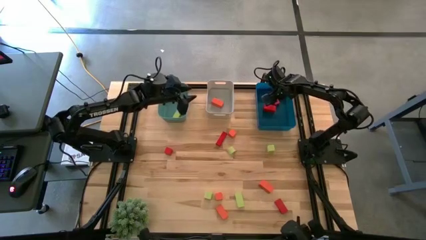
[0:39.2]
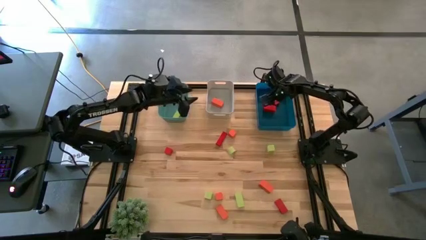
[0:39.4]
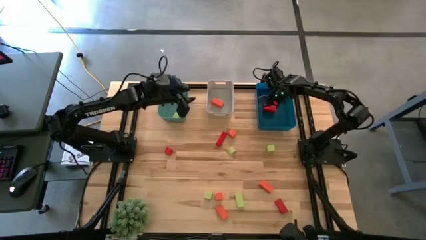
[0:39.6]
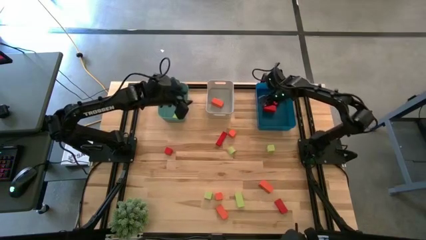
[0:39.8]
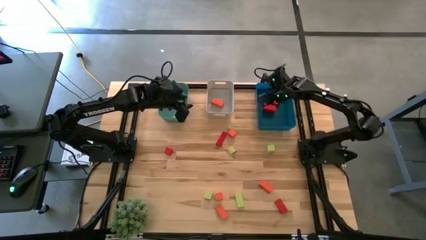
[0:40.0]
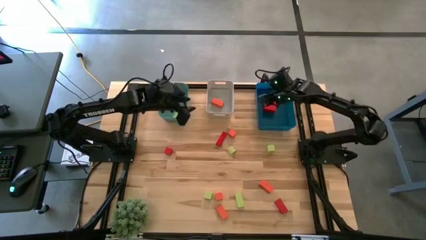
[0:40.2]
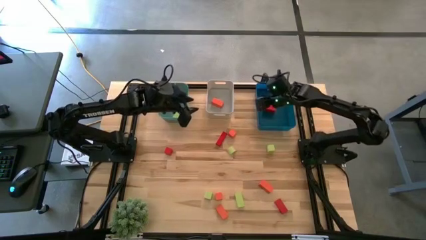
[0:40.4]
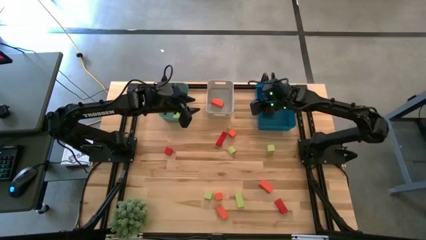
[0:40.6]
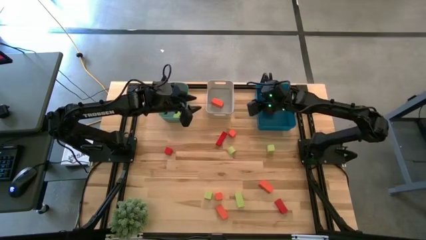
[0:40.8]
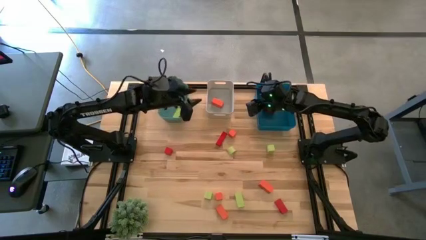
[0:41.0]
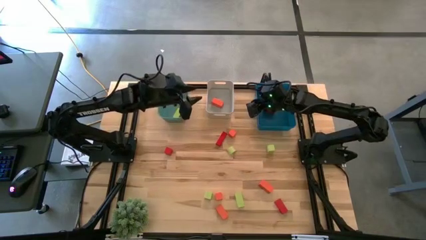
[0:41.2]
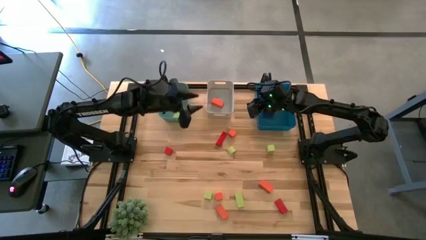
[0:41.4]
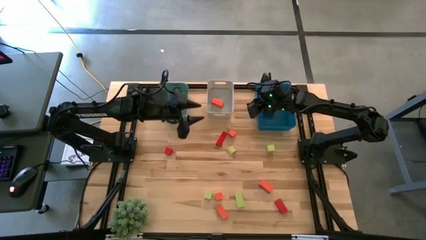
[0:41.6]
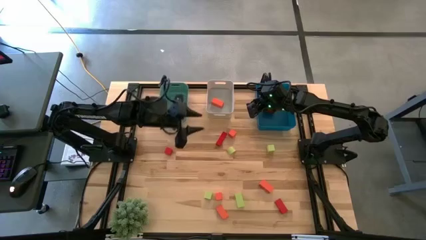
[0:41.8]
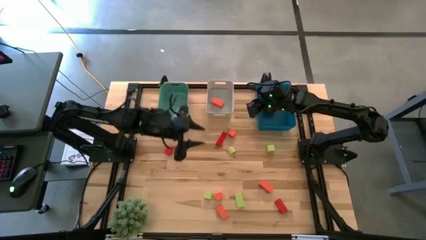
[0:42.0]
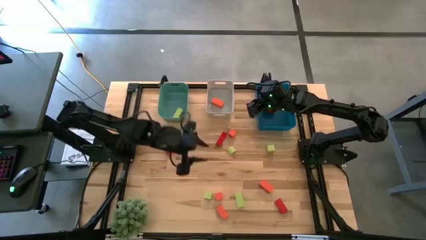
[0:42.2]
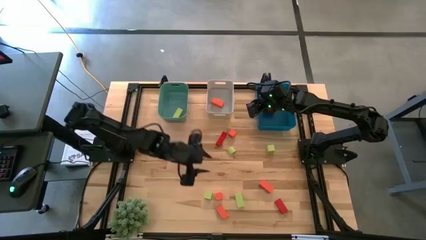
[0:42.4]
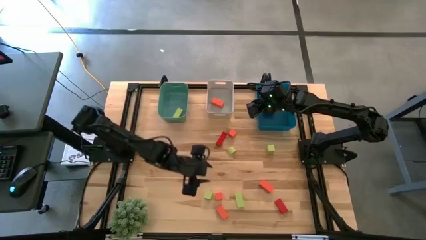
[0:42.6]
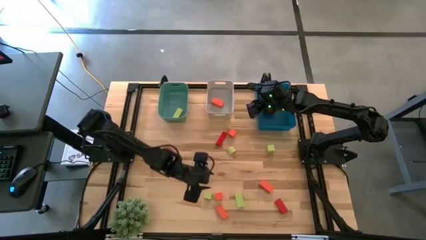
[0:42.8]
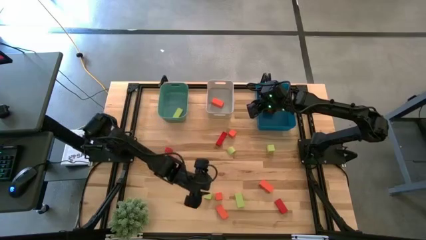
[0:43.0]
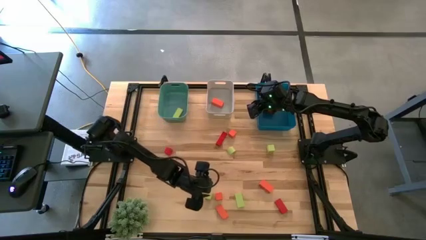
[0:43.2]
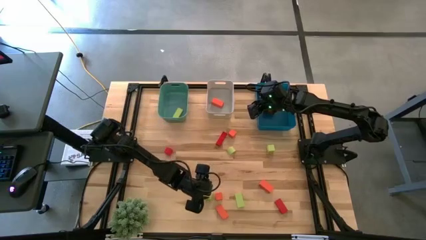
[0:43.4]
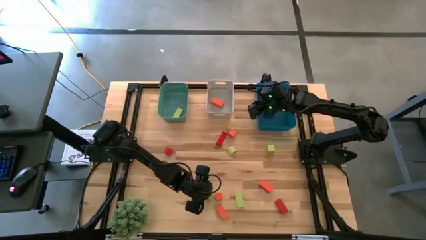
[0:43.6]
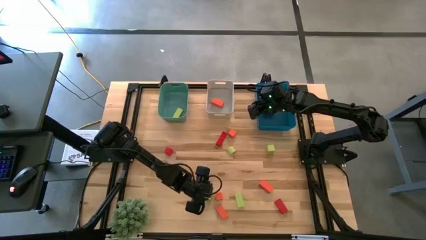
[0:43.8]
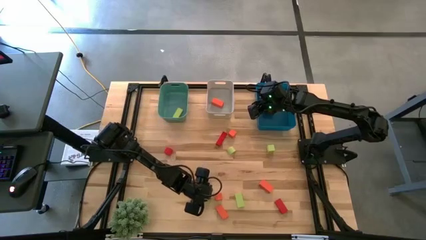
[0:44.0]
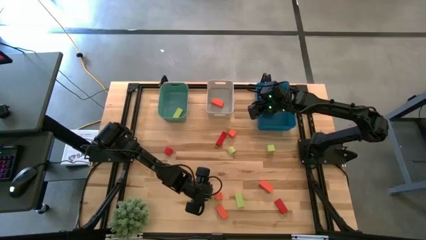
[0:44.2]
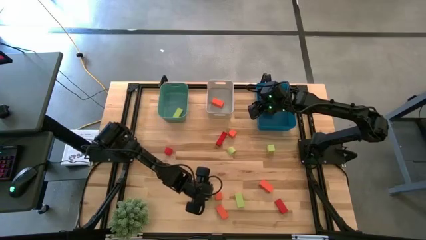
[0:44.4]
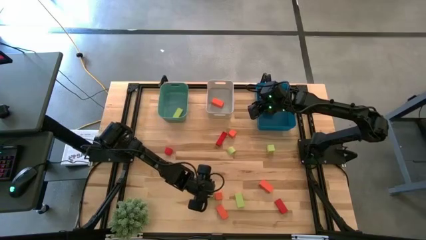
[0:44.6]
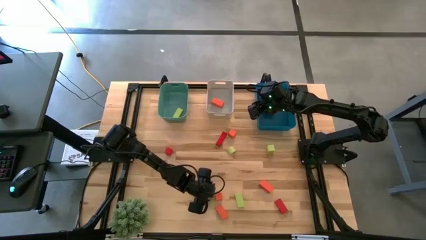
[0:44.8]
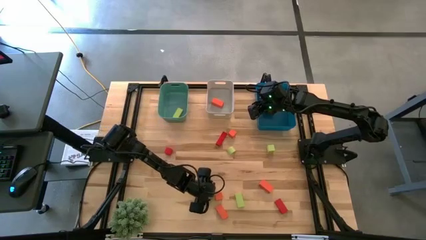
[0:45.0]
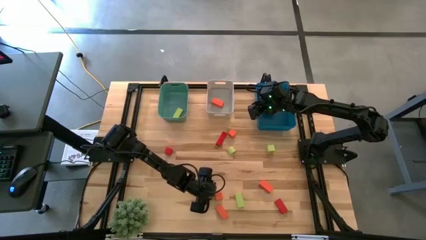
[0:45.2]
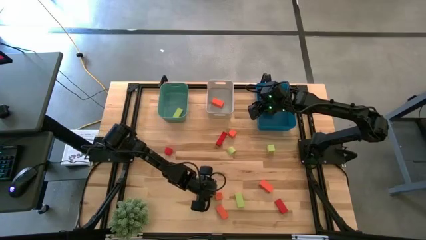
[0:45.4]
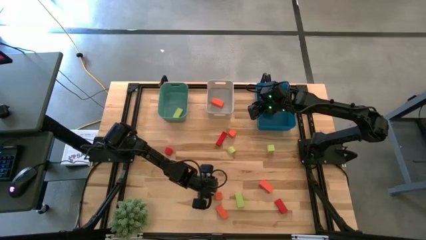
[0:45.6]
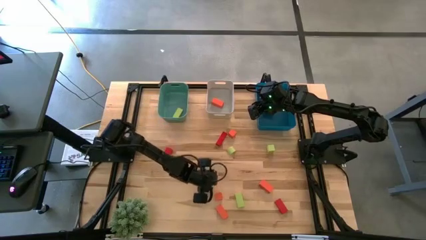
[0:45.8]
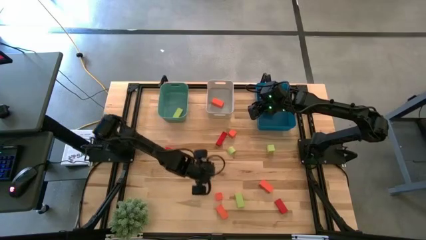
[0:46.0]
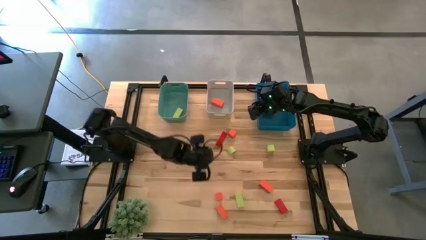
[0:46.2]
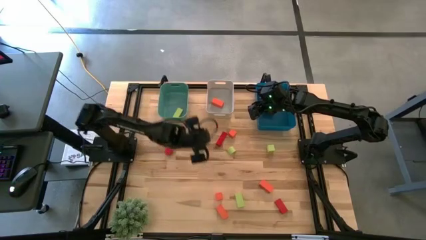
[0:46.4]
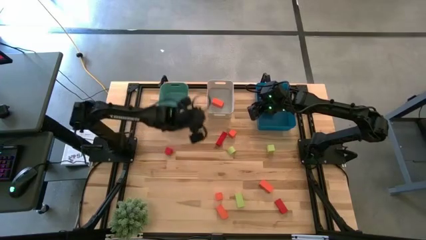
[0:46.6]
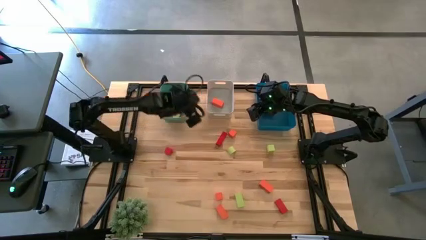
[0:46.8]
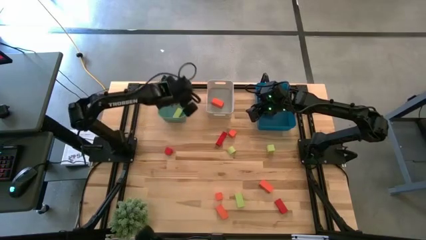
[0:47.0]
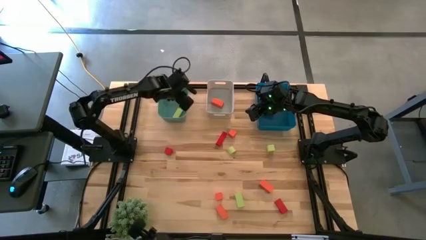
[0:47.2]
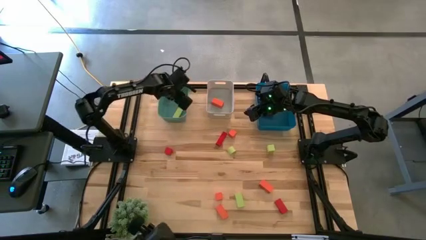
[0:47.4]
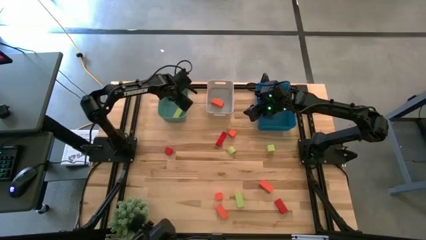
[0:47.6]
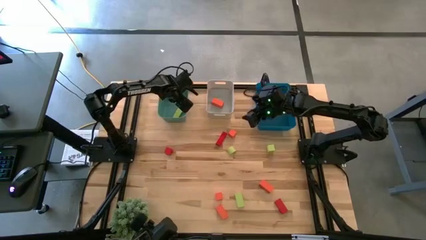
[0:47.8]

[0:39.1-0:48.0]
Task: Sort & place blocks by color
Put the green block into the green bin

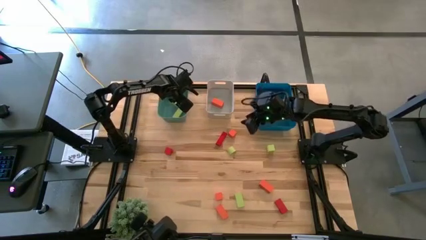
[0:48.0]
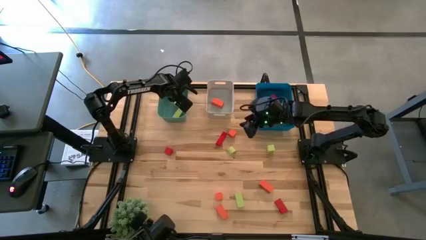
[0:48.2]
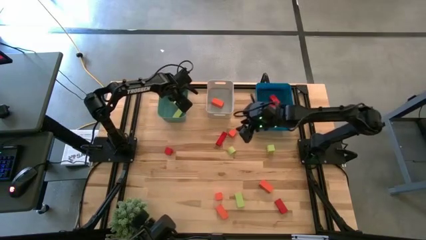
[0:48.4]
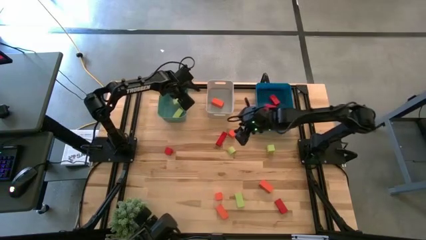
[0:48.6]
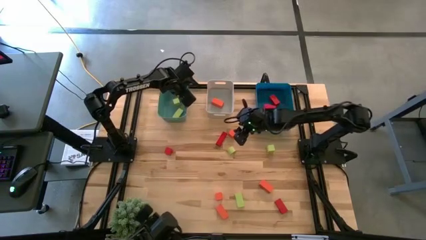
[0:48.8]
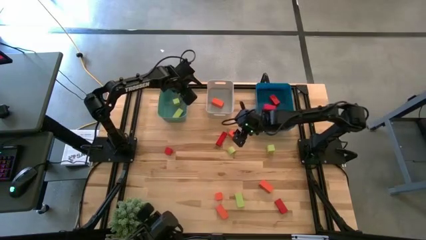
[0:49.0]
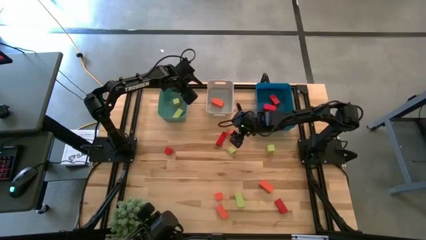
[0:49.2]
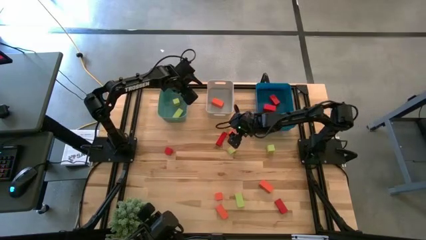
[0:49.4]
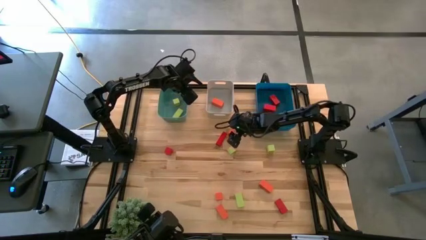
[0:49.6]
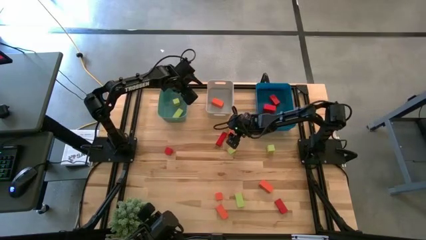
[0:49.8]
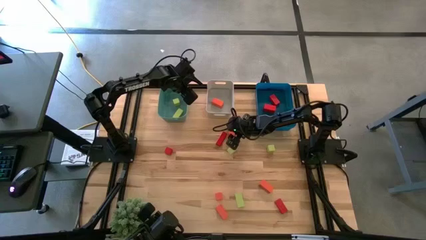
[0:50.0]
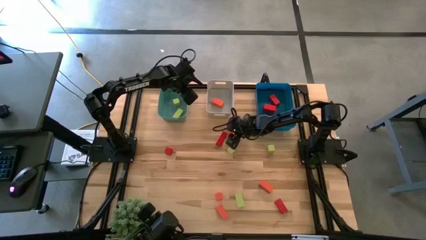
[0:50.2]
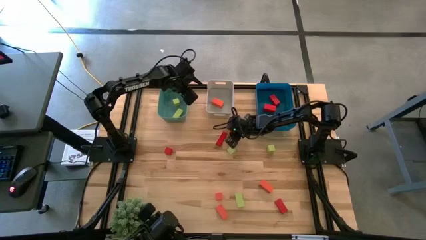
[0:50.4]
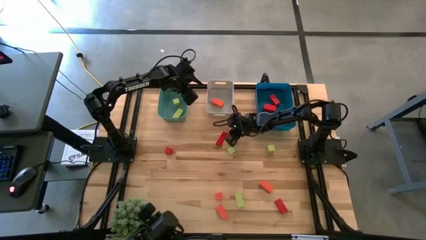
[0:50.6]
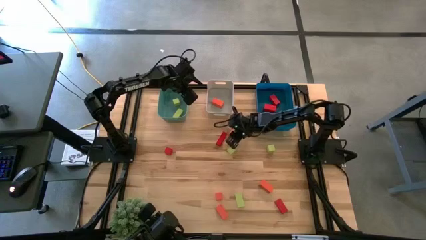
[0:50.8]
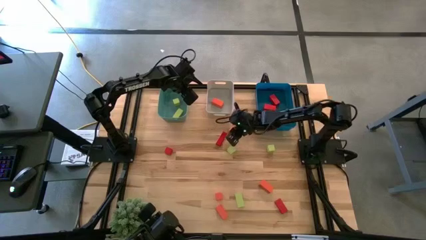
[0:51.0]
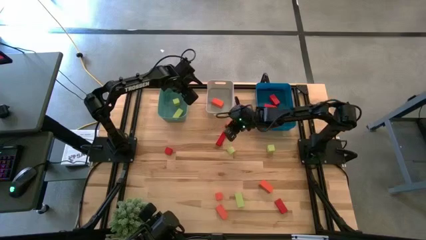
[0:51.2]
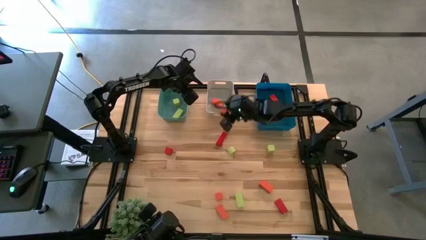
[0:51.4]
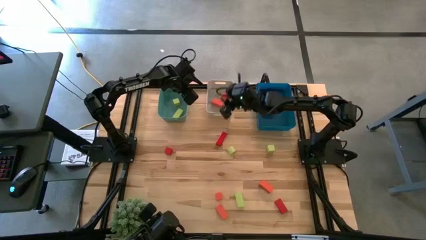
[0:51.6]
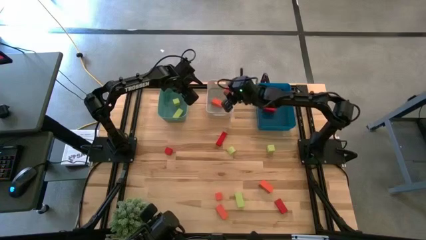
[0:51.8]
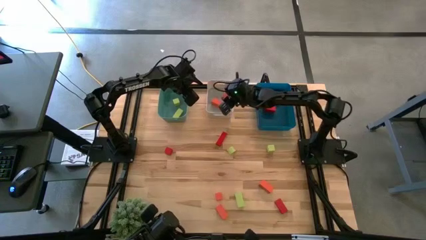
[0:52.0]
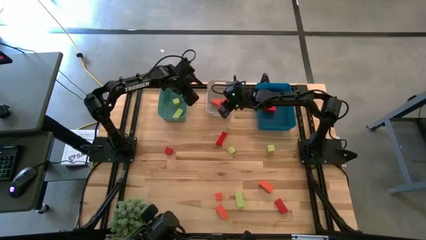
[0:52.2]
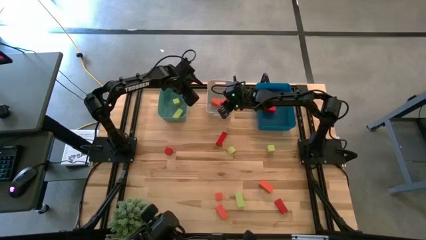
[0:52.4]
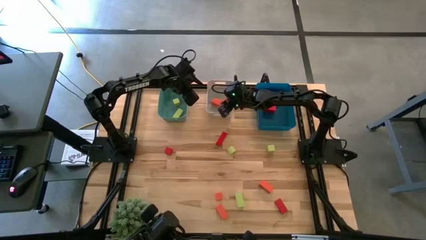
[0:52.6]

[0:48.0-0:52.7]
Put the orange block into the gray bin

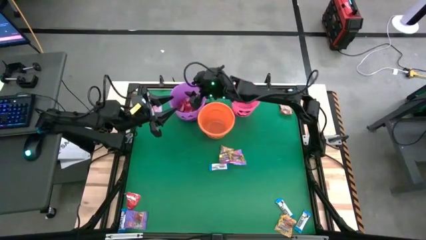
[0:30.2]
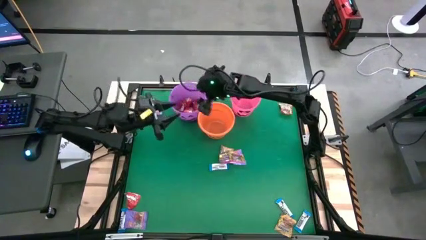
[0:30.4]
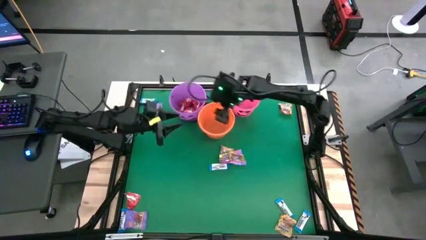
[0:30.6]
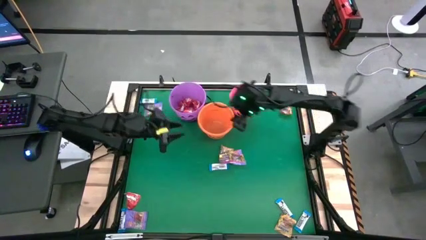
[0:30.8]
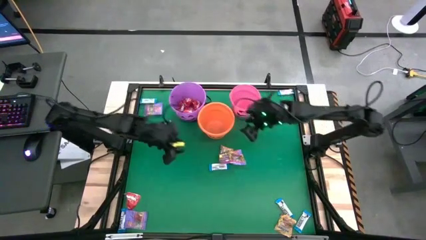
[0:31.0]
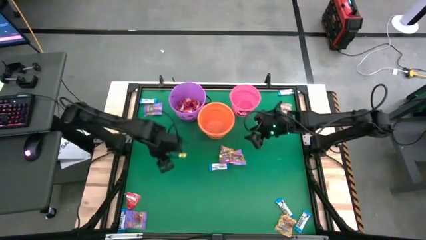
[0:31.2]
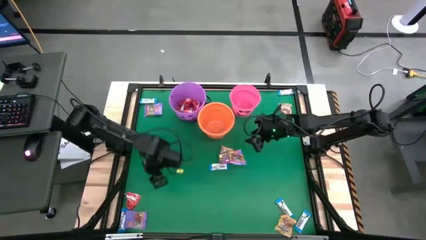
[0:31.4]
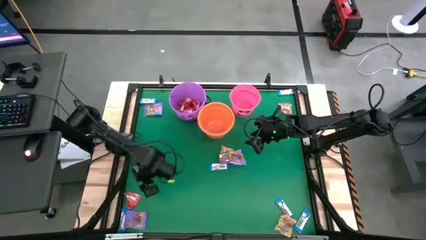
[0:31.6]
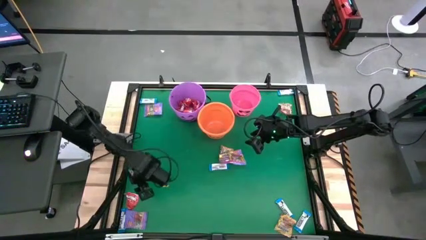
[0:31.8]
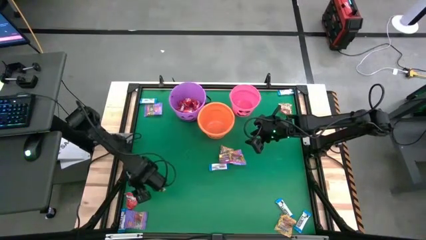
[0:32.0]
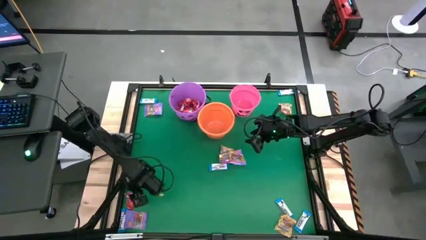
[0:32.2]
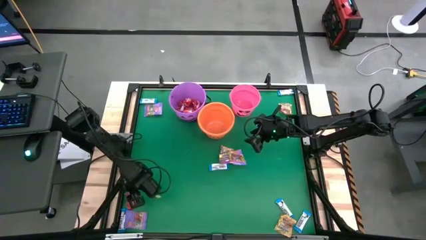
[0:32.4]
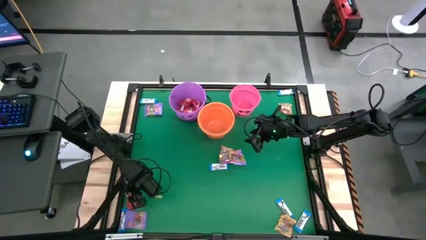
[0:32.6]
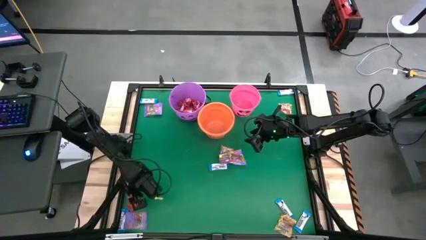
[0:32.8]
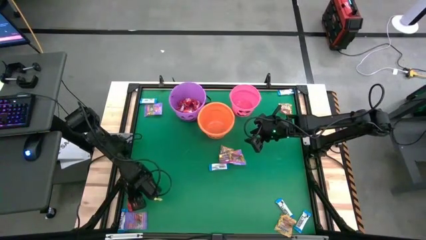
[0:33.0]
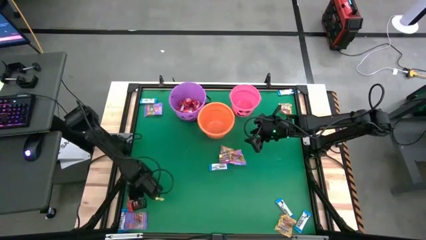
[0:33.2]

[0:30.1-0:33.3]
Task: Sort candy by brand, put in halloween buckets
Put the red candy into the purple bucket
